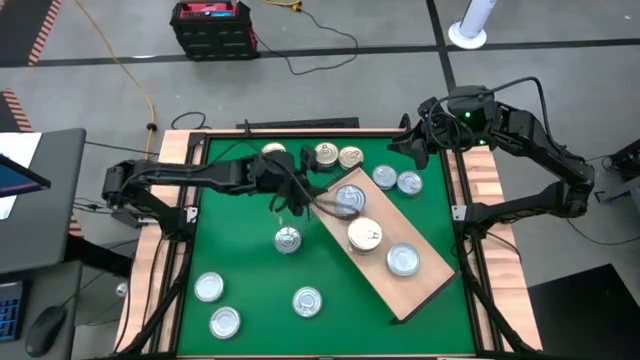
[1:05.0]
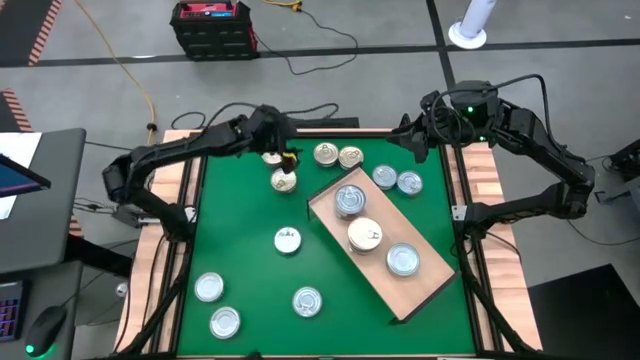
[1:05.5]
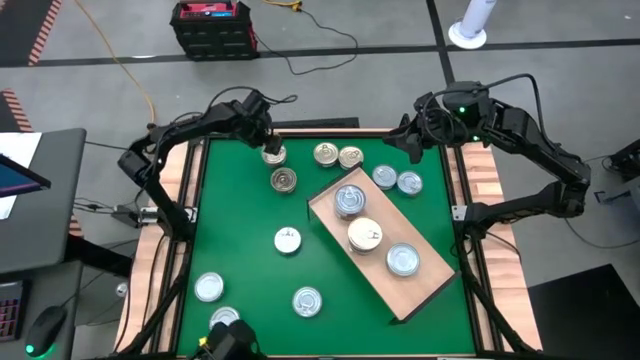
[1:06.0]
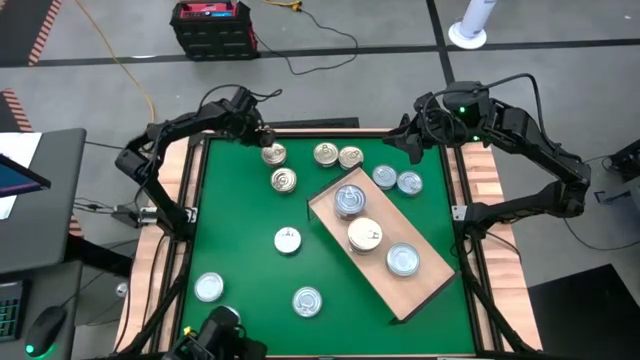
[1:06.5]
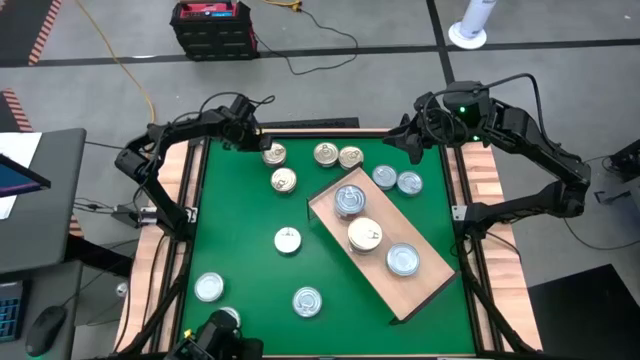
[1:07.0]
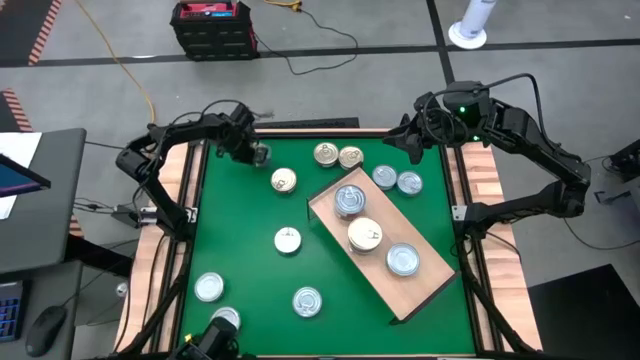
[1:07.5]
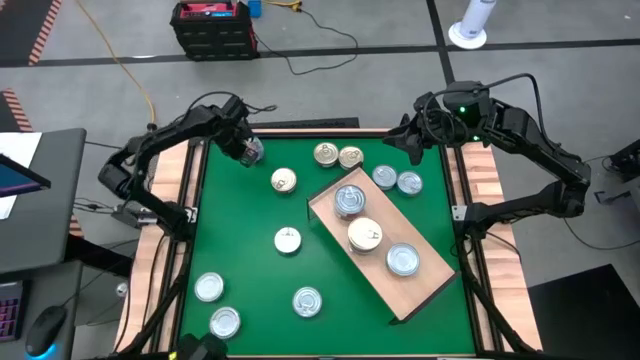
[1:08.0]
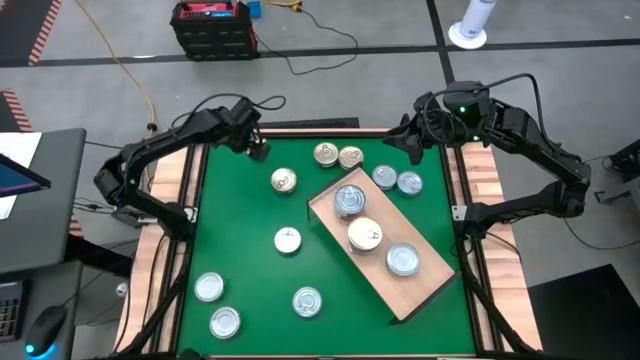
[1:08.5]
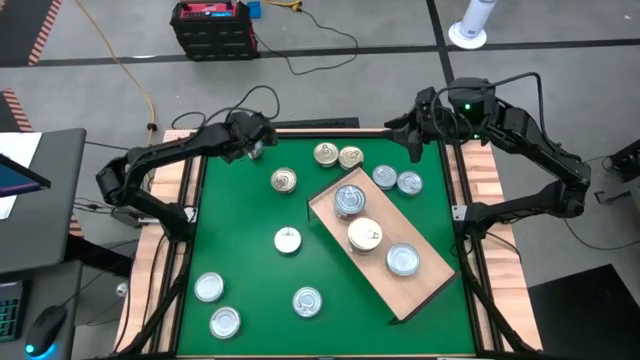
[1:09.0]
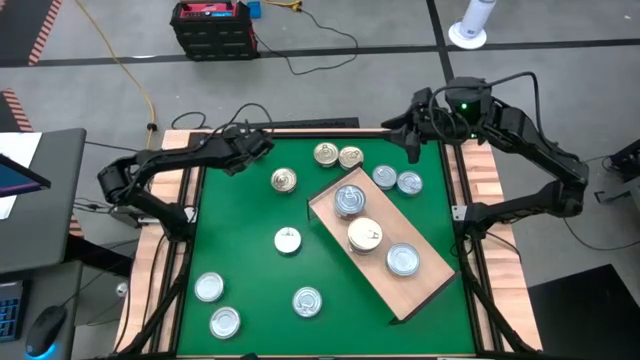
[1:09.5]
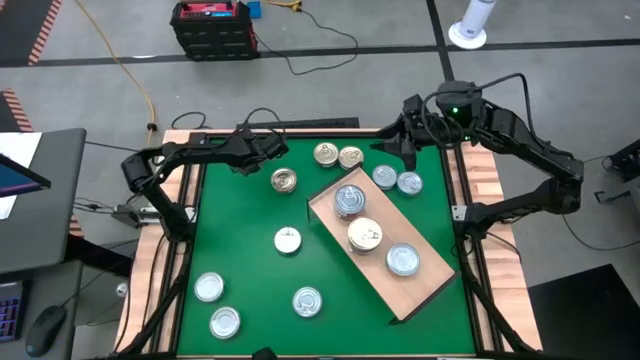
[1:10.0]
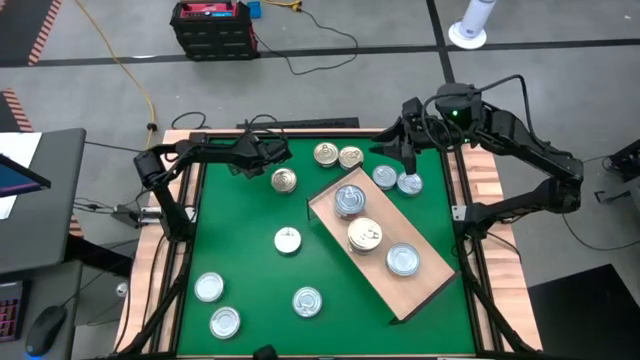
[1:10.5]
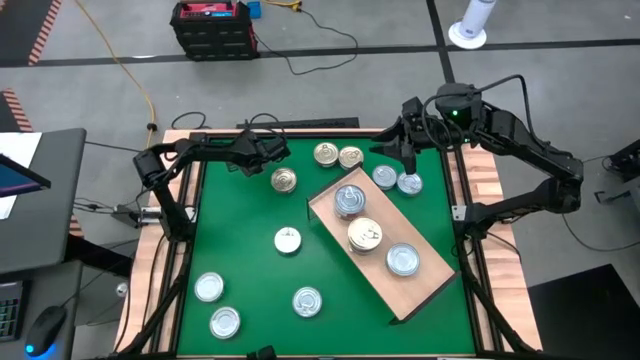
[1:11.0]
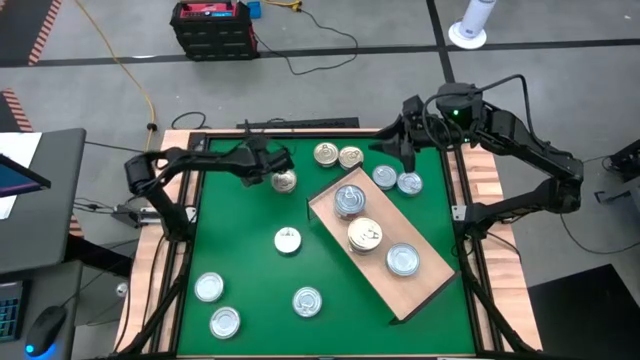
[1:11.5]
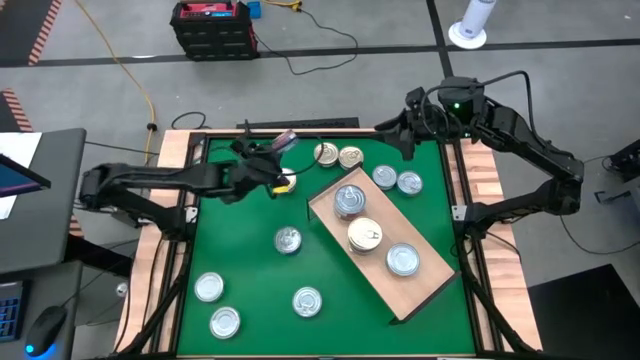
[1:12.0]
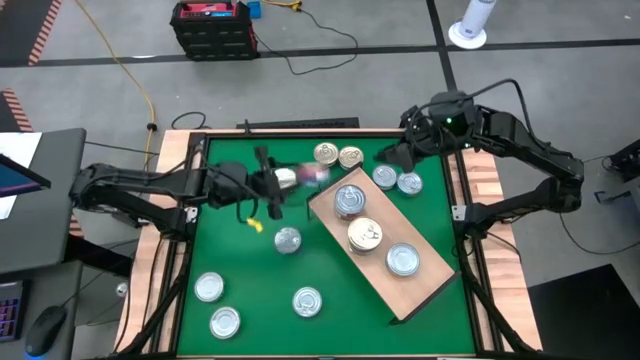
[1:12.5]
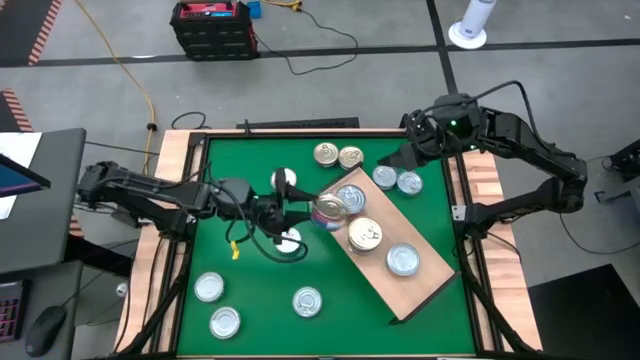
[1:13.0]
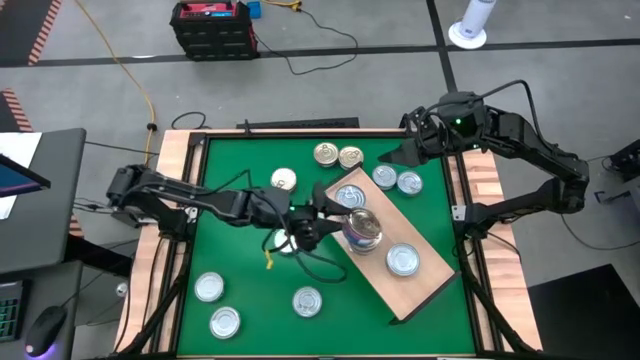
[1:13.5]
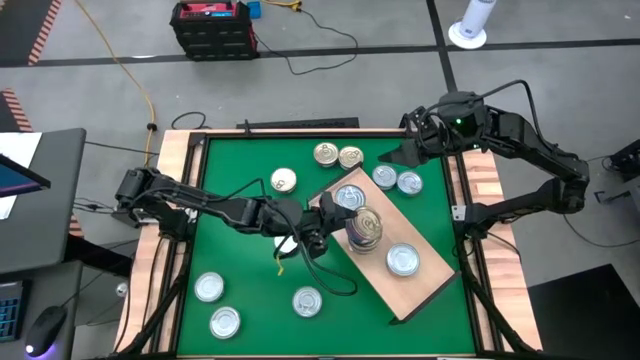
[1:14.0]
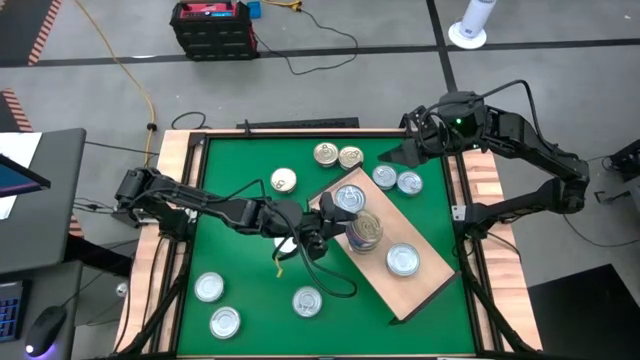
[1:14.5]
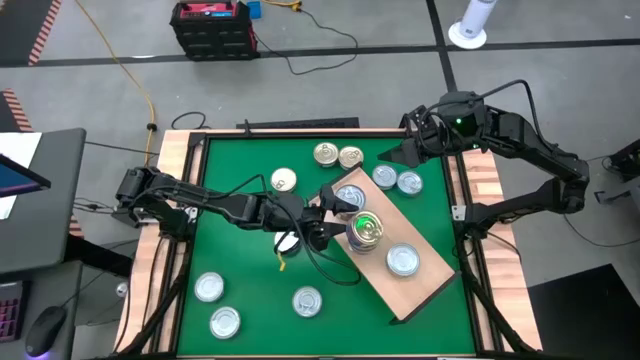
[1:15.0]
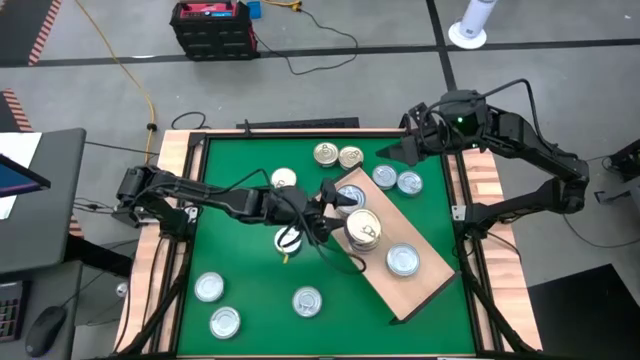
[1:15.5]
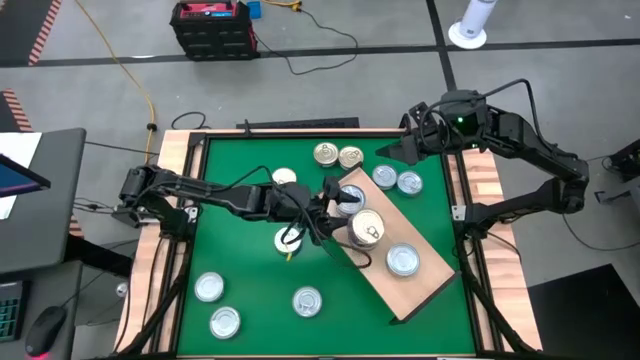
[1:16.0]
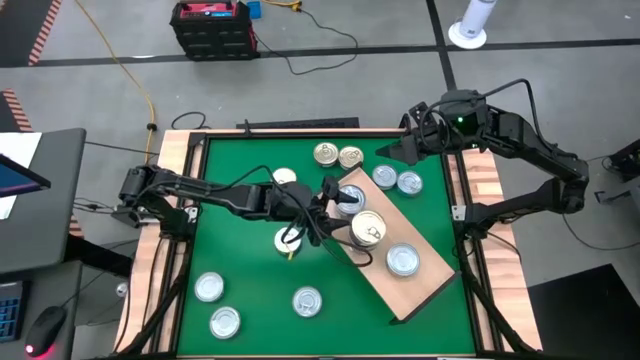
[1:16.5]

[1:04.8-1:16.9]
Task: Stack canned seafood by type on shelf
Stack the blue and pink tuna can on top of the other blue and pink tuna cans on the shelf

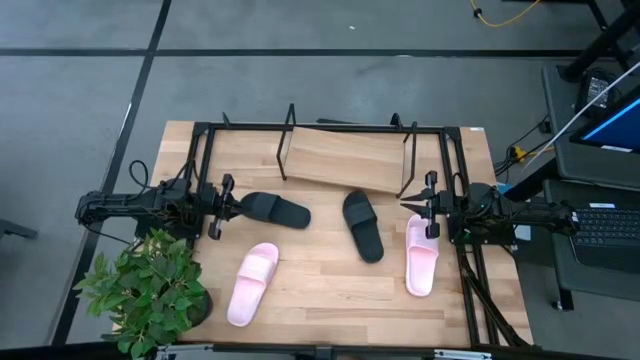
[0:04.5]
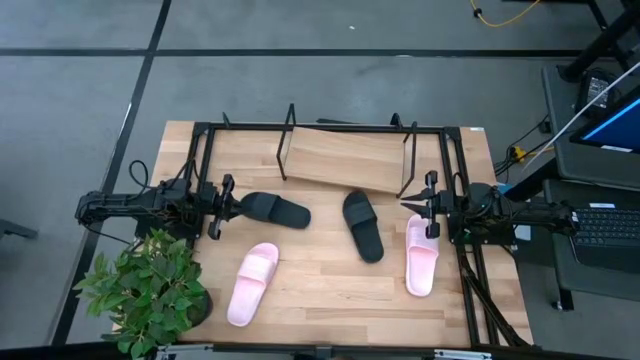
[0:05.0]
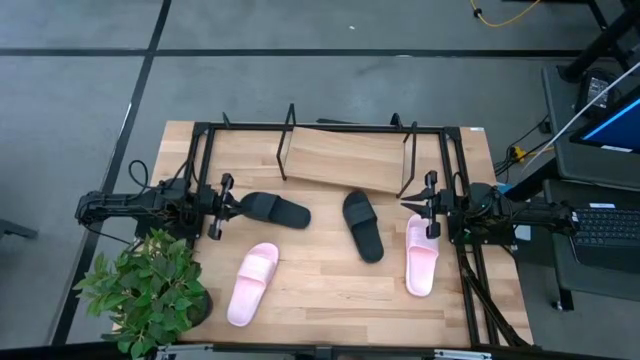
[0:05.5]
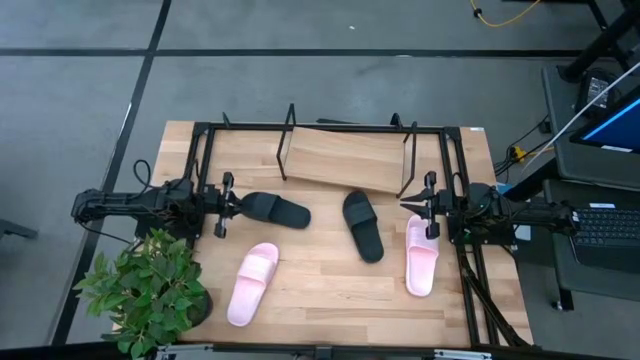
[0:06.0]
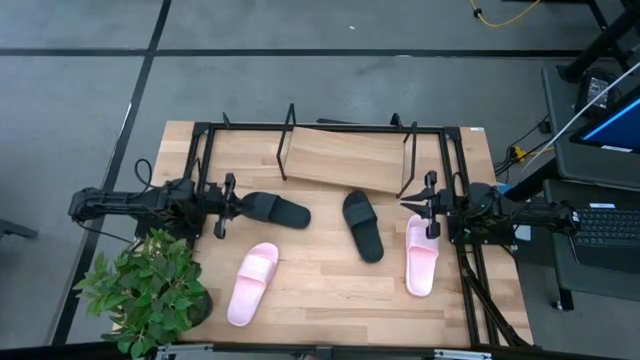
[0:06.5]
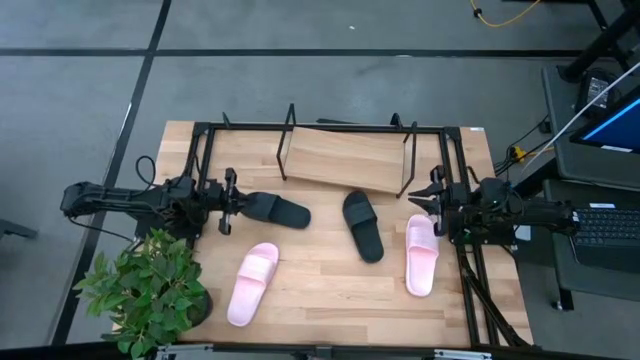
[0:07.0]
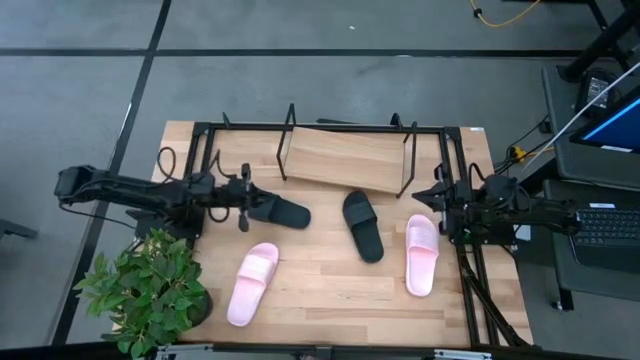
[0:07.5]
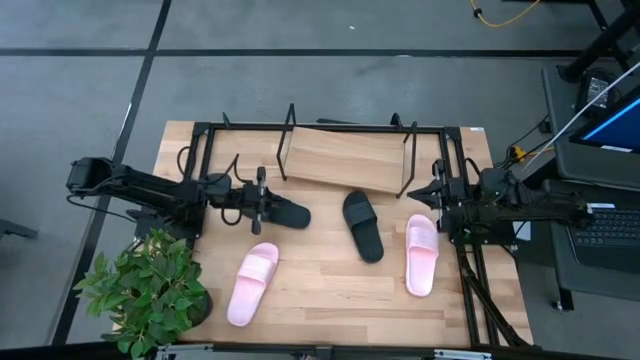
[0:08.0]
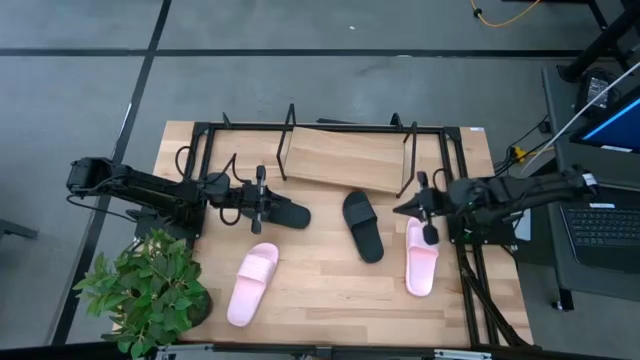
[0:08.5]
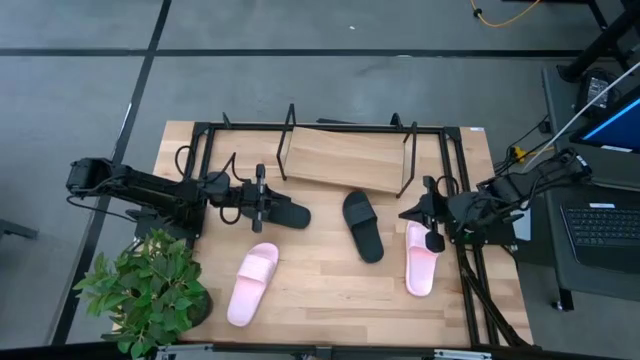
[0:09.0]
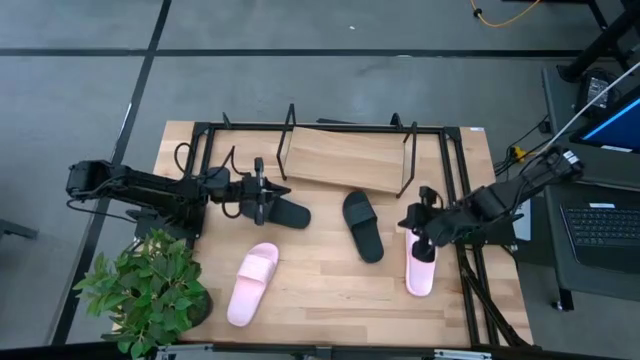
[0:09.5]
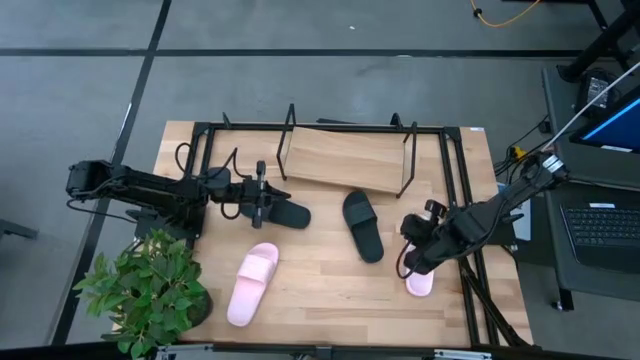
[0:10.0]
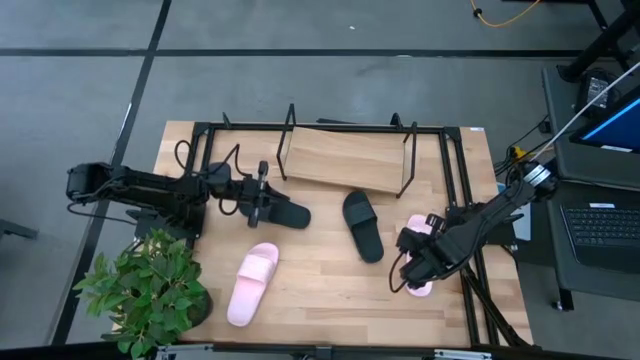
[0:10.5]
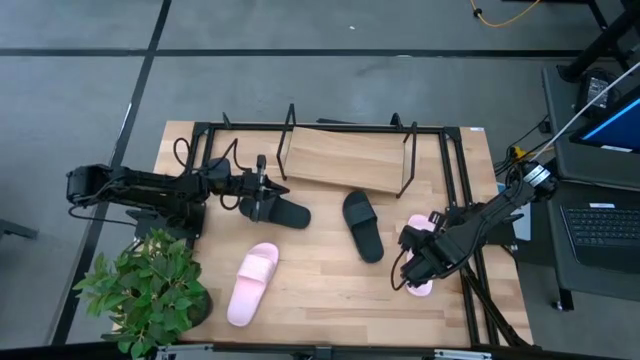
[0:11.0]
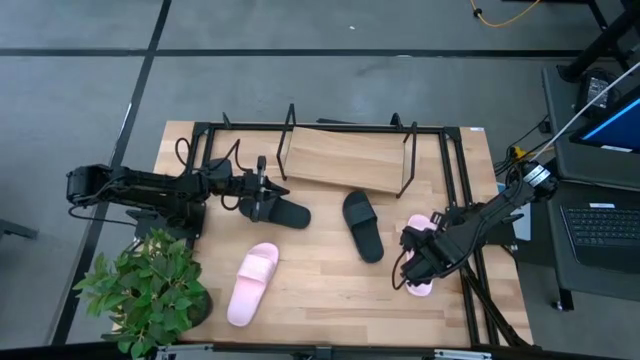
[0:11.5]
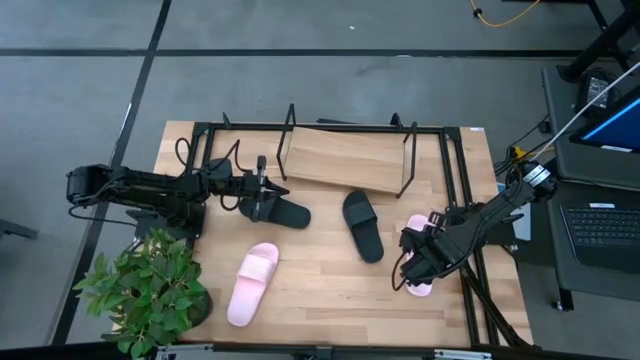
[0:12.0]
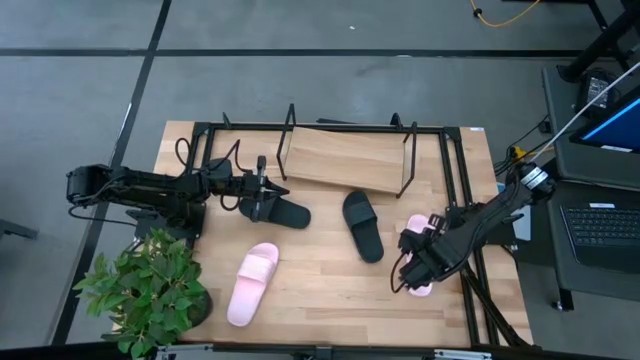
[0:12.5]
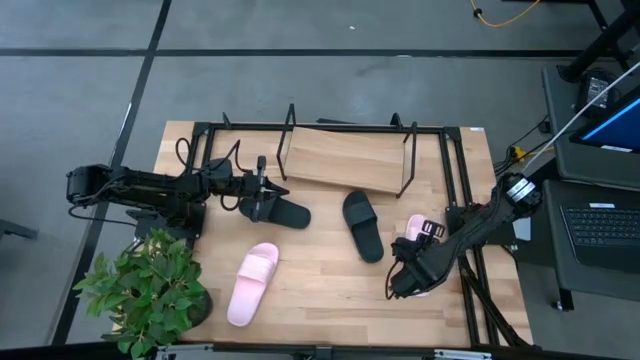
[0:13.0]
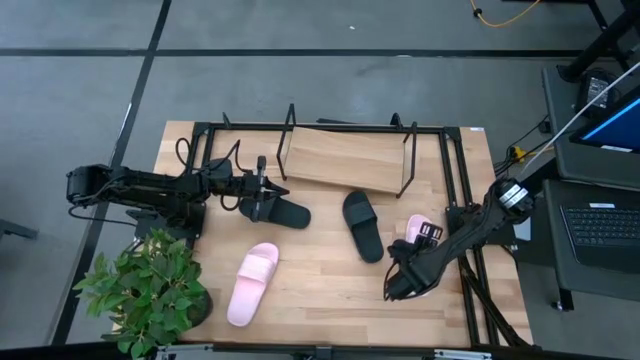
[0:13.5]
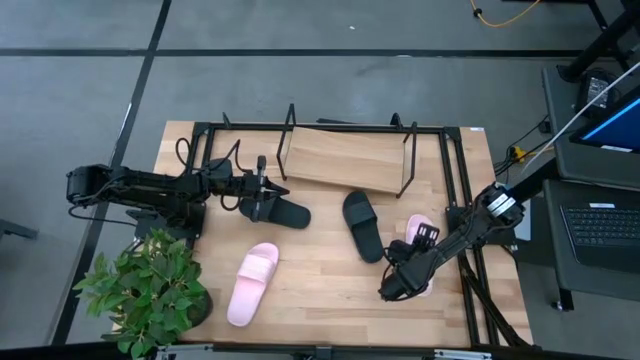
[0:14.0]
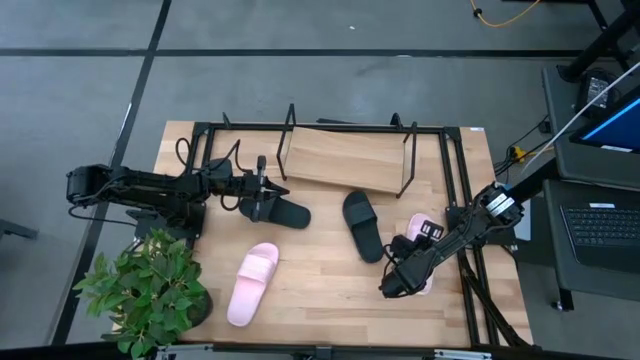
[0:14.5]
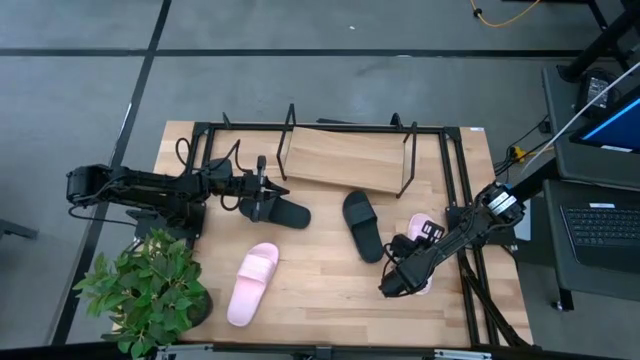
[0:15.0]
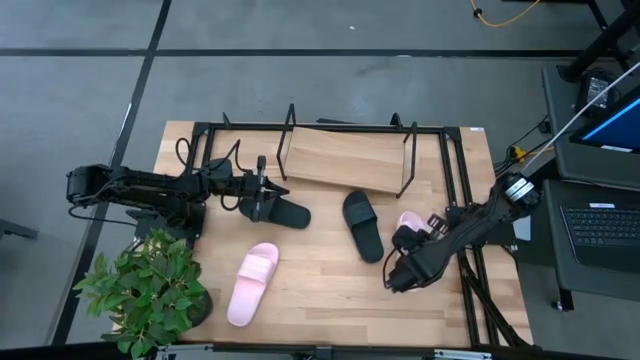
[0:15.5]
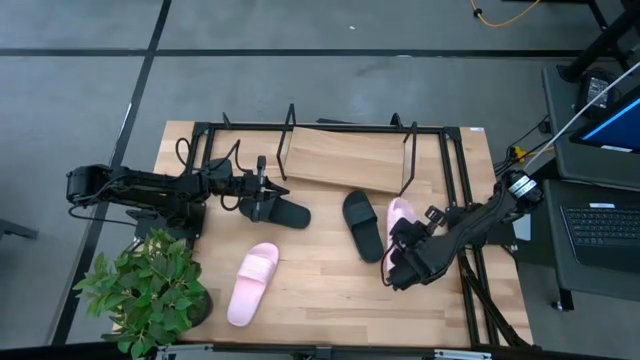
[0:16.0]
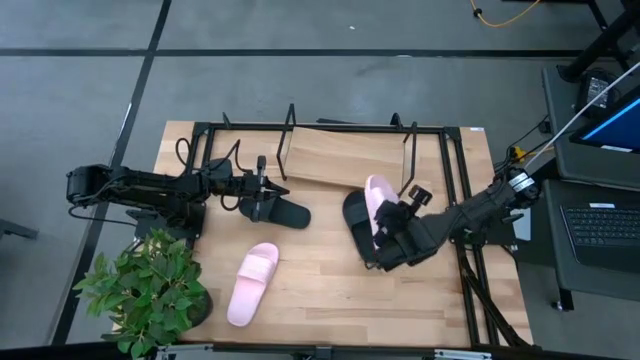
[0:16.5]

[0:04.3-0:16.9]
Task: Pick and place slides into the shelf
Put the right pink slide on the shelf
